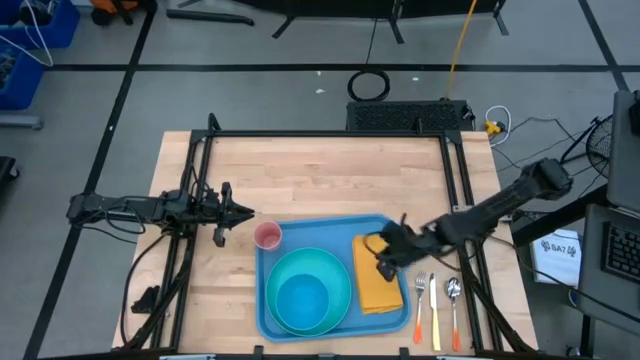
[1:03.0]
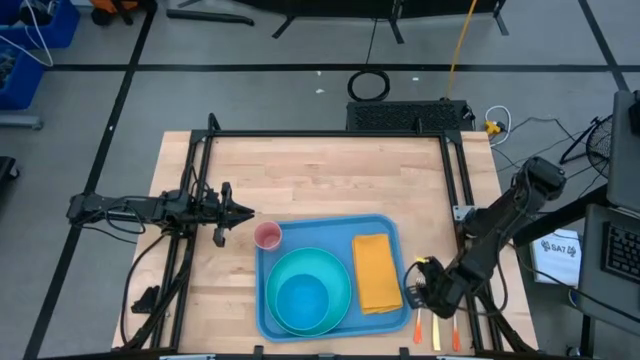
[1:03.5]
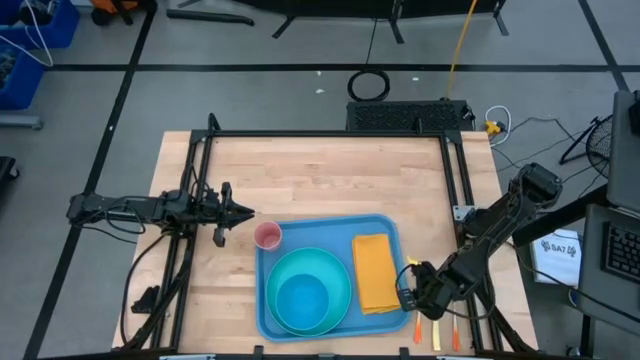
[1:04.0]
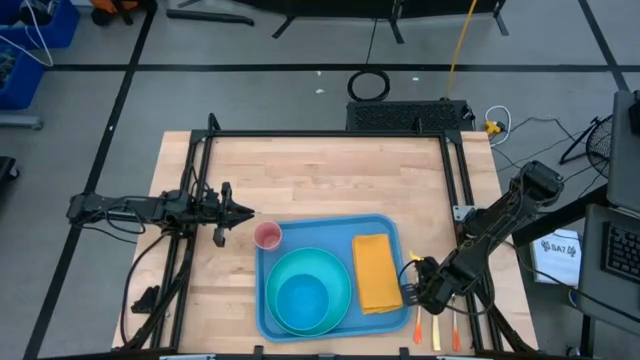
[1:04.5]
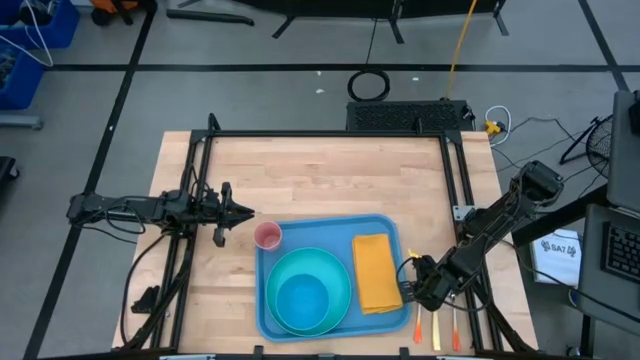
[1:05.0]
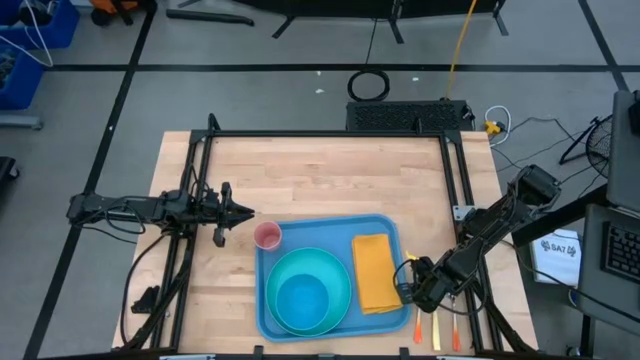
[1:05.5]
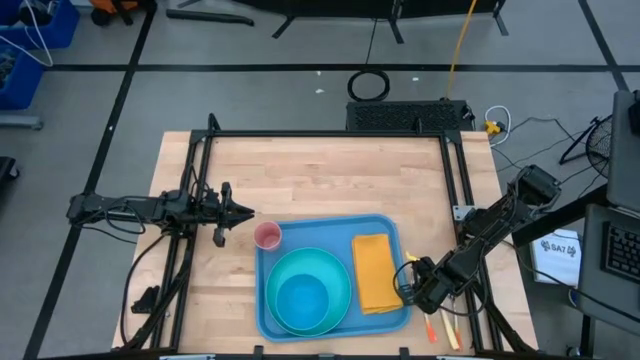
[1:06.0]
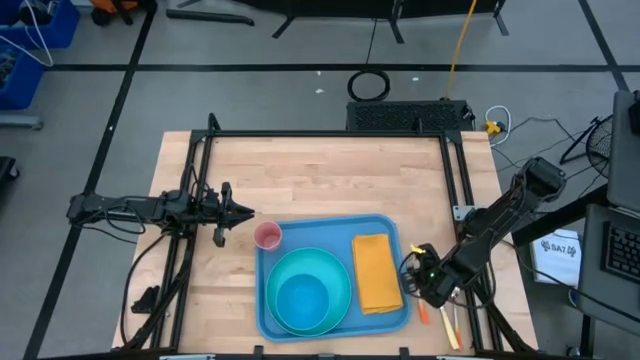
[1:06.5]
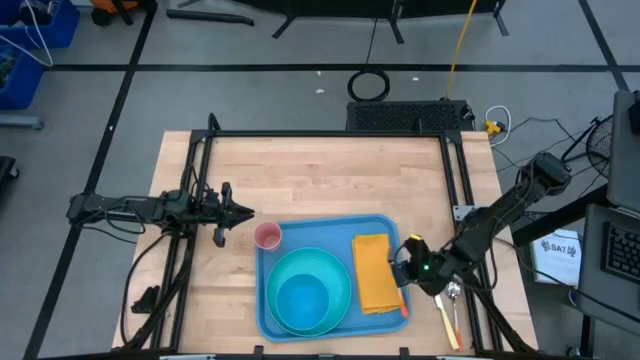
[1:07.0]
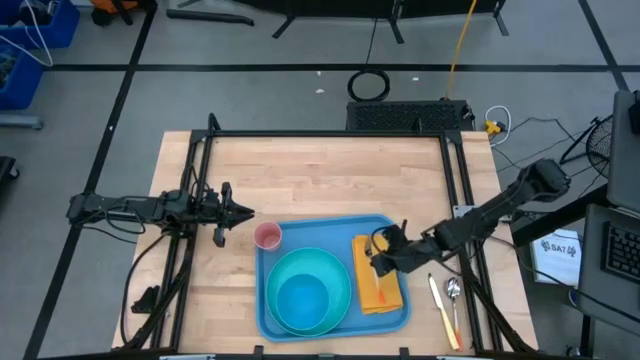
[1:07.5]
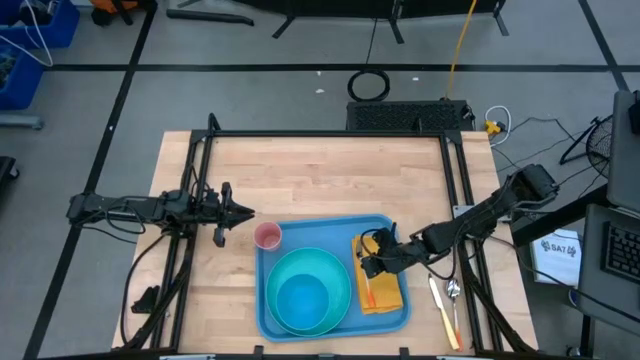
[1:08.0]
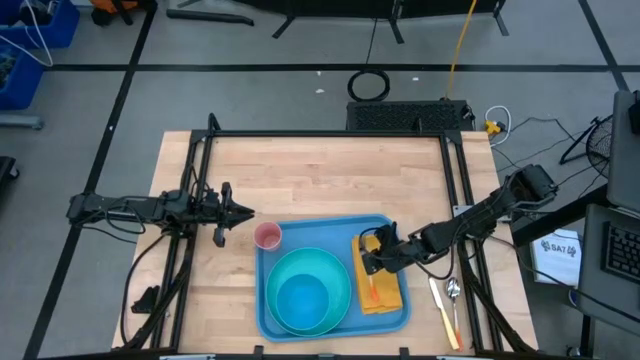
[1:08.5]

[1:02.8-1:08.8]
Task: Set up tray
Put the orange fork on top of the yellow napkin to the right of the green plate

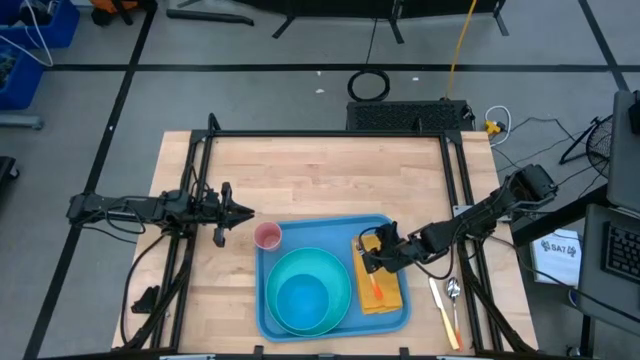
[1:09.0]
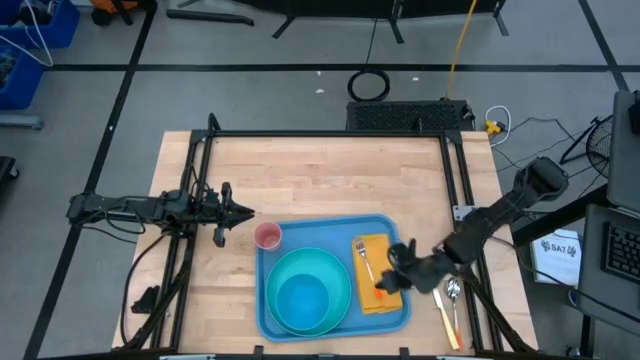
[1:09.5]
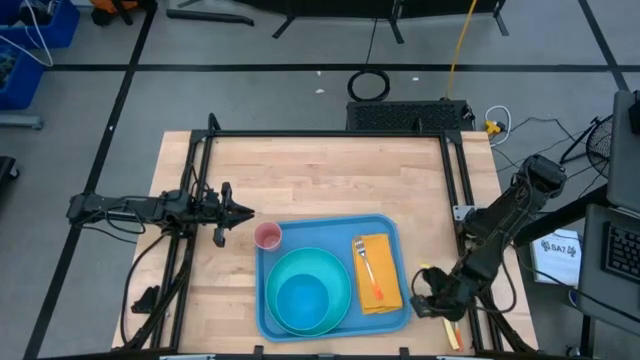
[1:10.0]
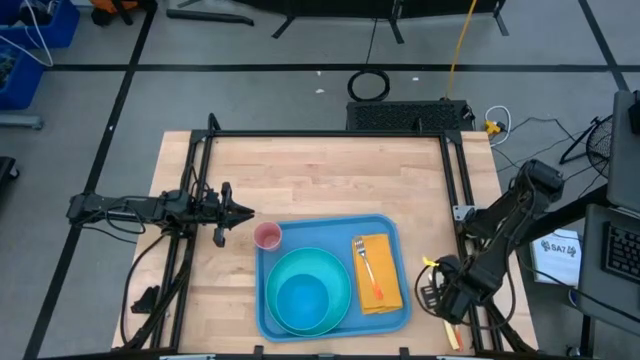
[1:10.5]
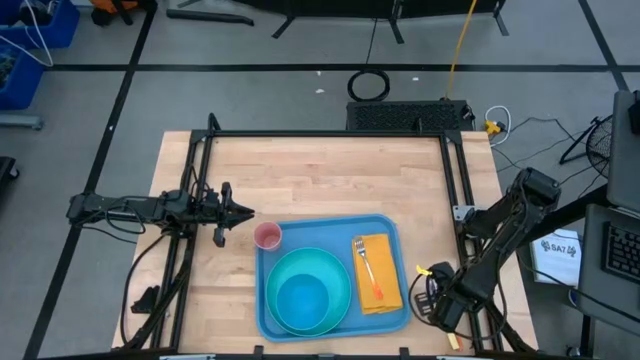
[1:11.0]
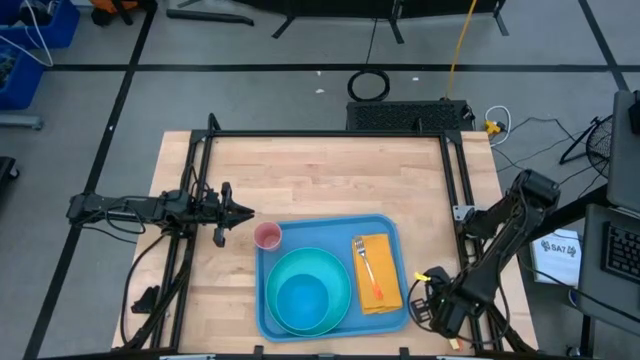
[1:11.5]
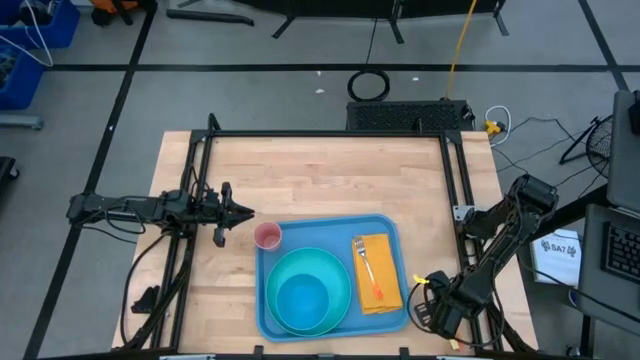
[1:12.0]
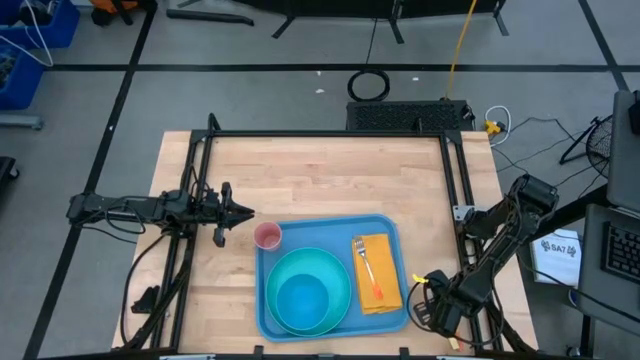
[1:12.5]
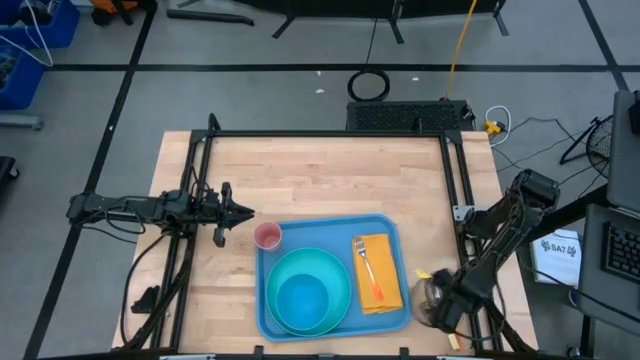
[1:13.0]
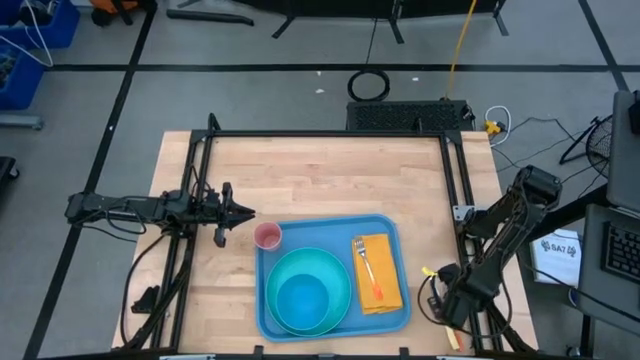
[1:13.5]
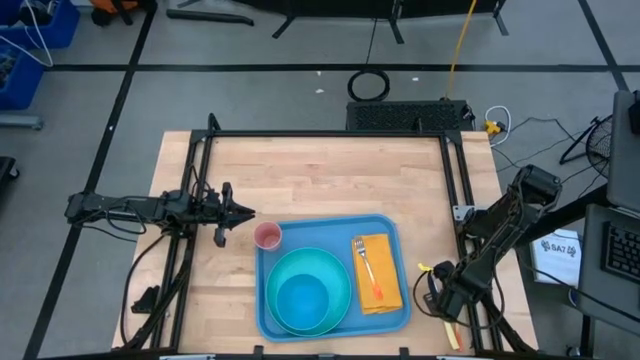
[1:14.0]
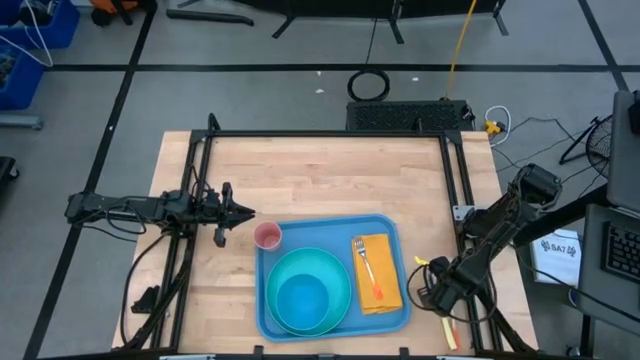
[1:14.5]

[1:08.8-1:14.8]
Put the orange spoon on top of the yellow napkin to the right of the orange fork

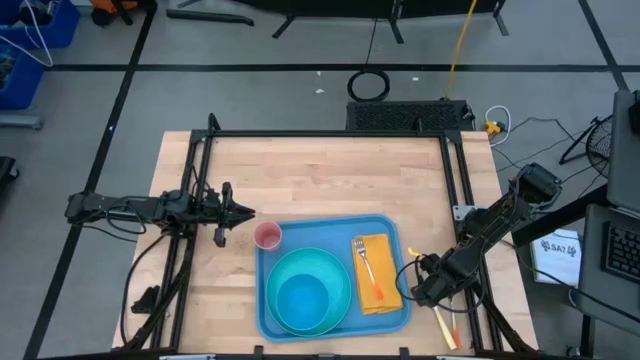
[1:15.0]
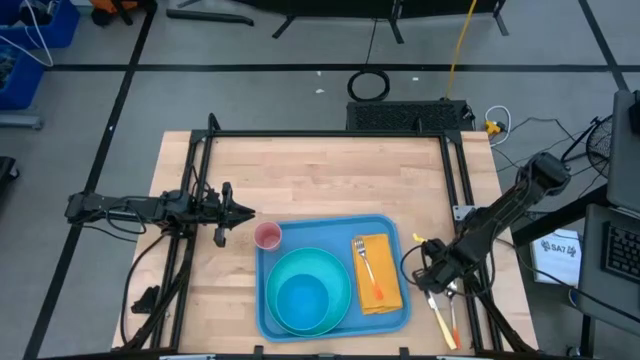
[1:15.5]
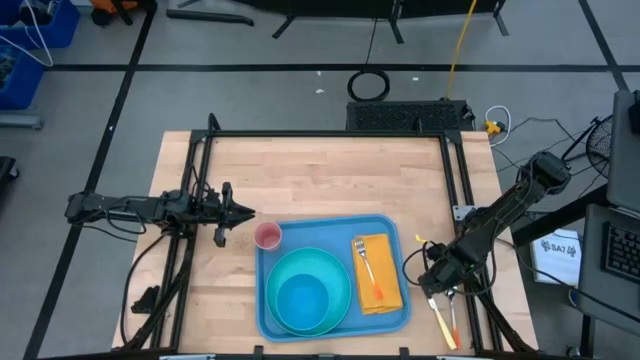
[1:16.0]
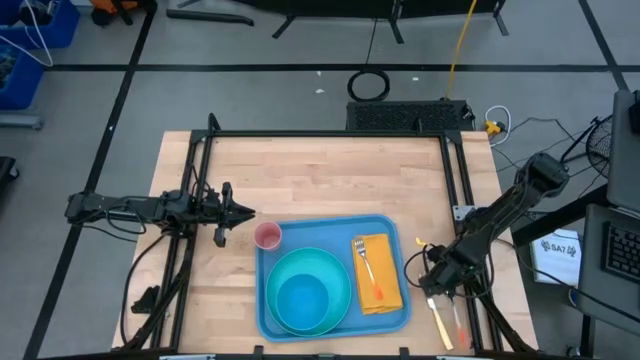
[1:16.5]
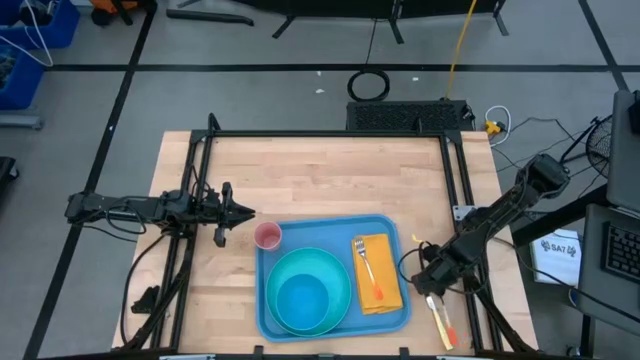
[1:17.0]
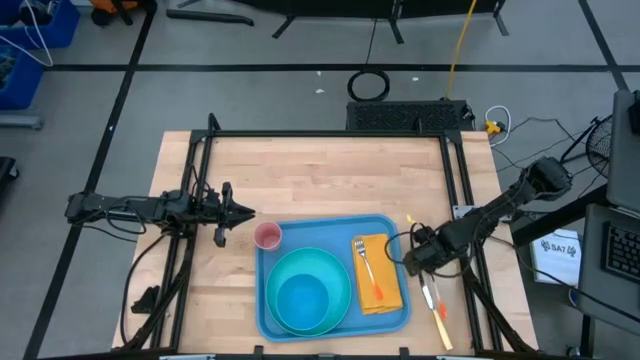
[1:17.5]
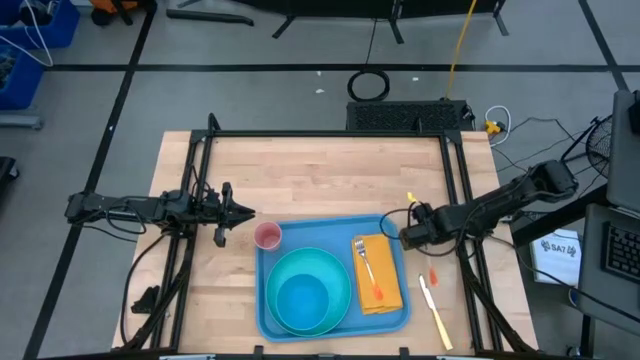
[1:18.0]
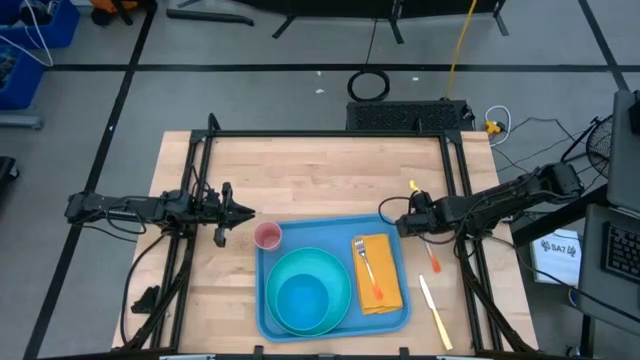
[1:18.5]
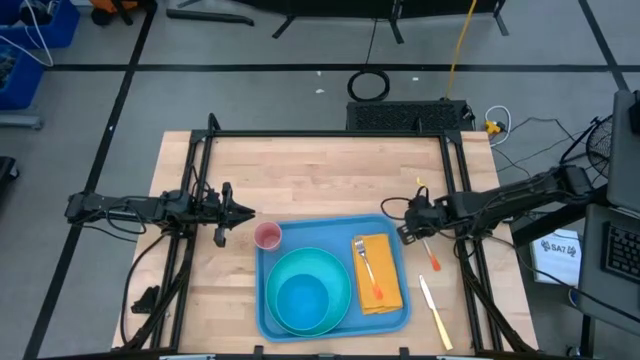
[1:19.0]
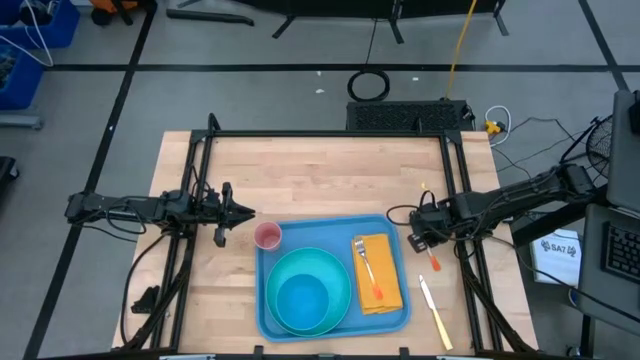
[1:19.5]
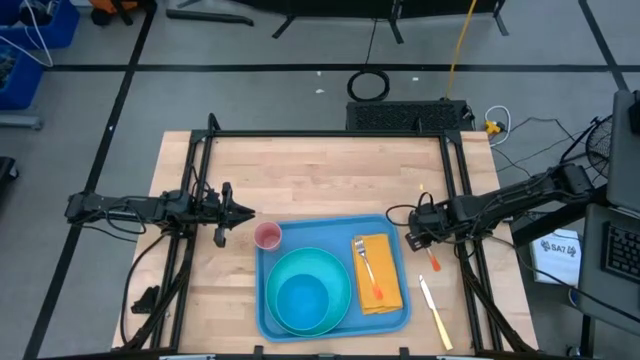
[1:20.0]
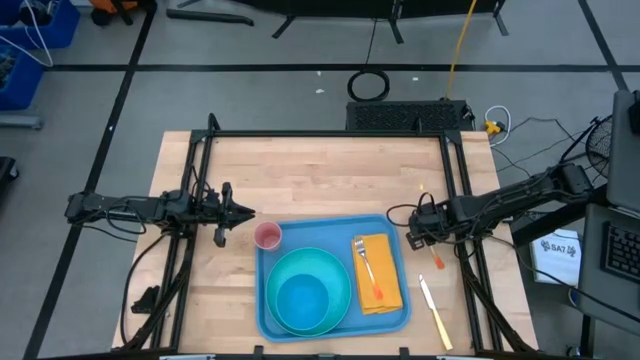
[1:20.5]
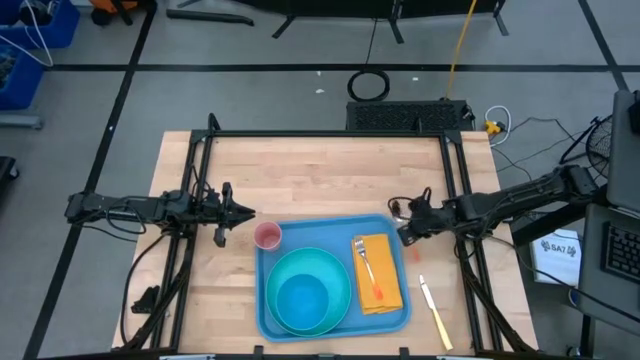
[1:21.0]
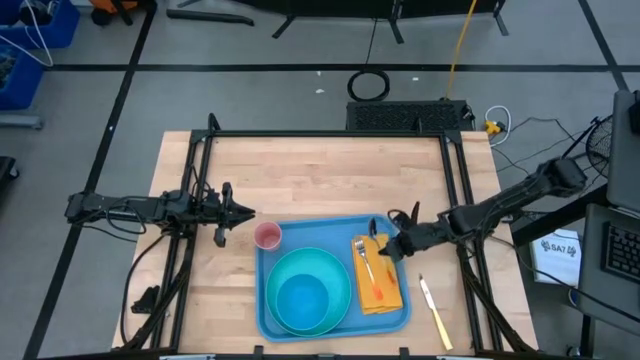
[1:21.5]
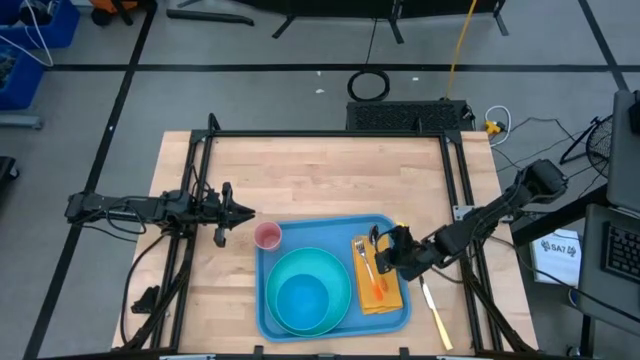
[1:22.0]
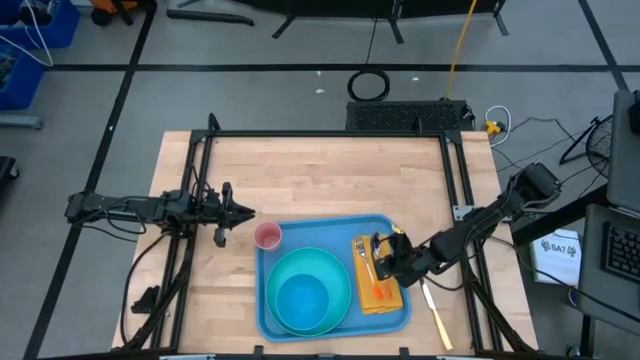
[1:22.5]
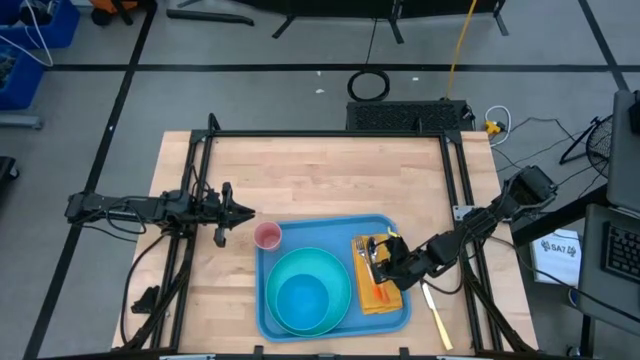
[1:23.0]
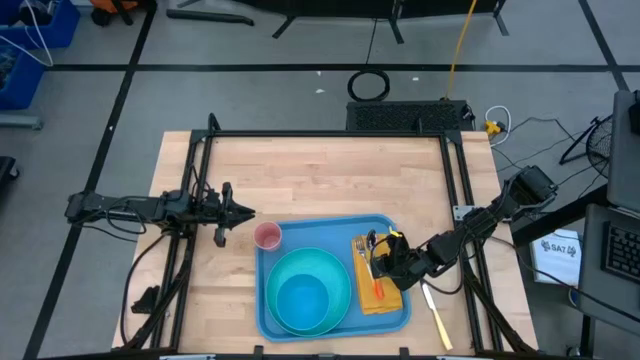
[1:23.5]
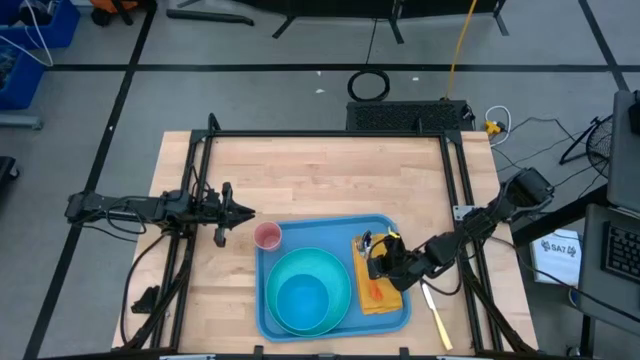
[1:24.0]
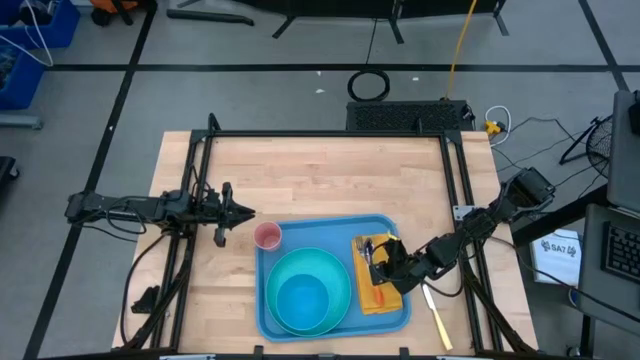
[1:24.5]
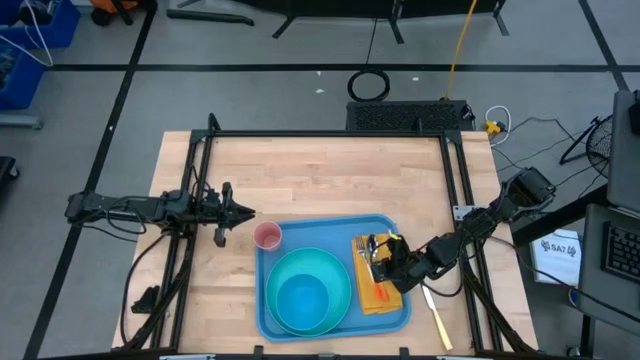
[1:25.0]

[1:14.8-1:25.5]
Put the orange spoon on top of the yellow napkin to the right of the orange fork
